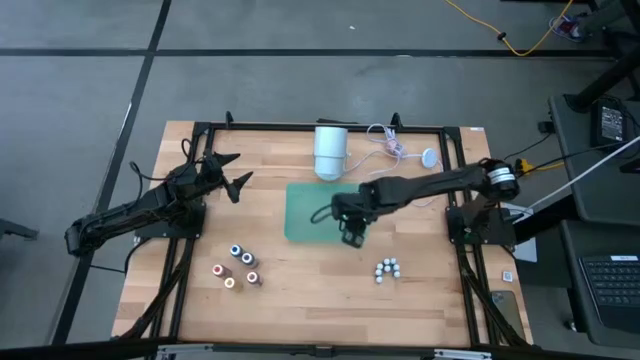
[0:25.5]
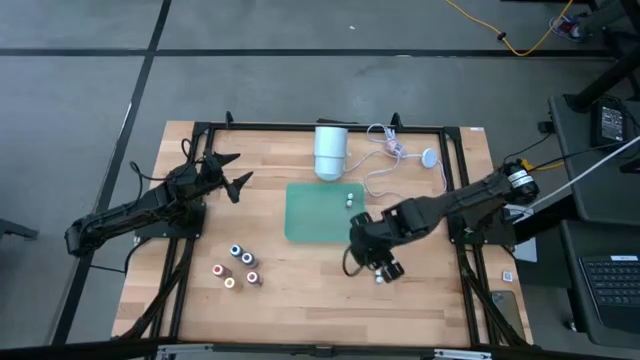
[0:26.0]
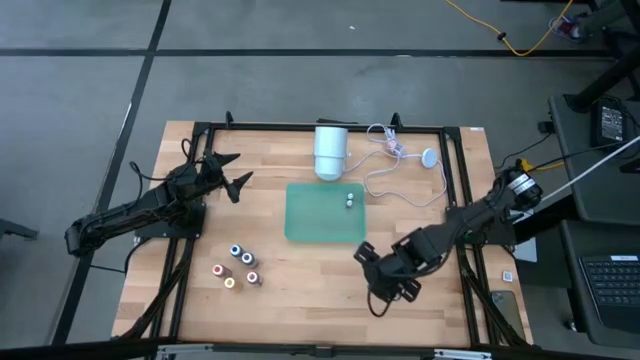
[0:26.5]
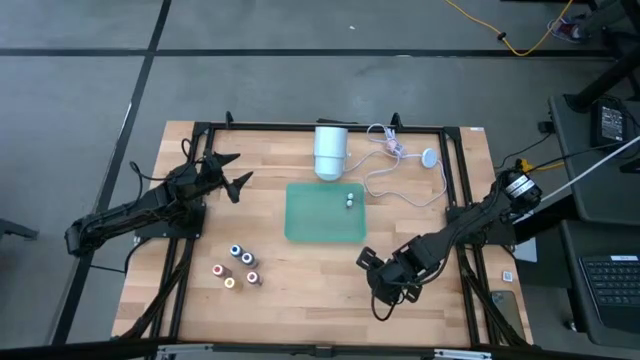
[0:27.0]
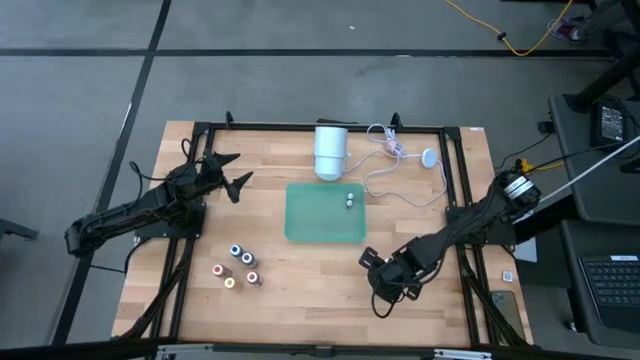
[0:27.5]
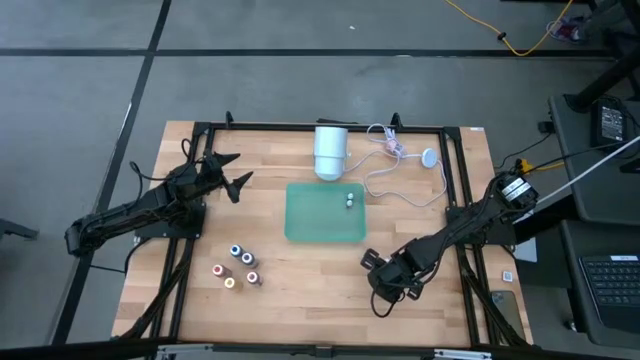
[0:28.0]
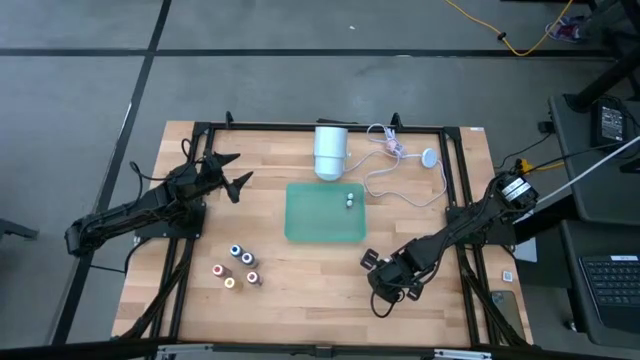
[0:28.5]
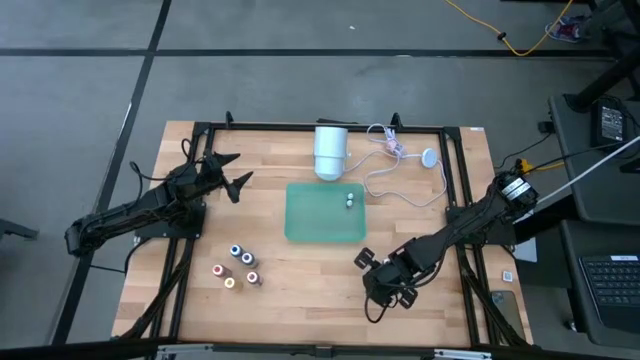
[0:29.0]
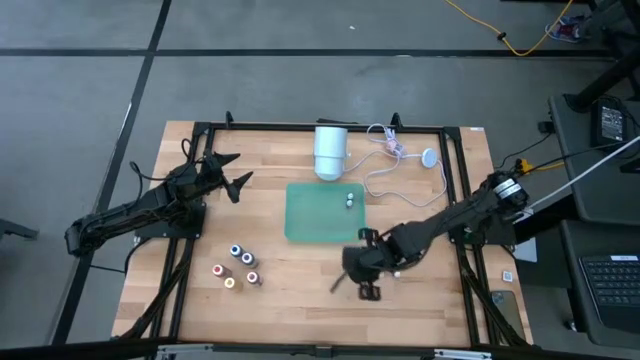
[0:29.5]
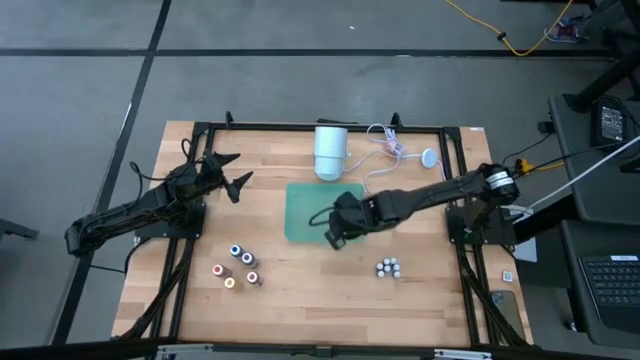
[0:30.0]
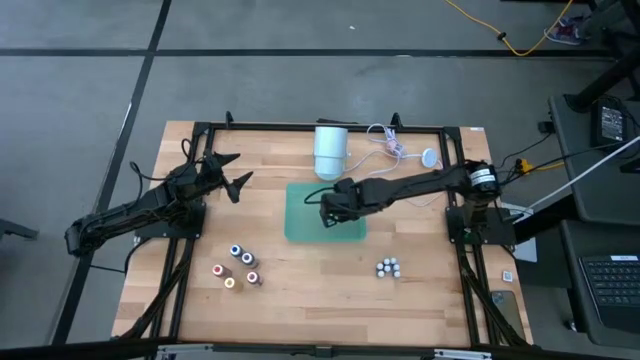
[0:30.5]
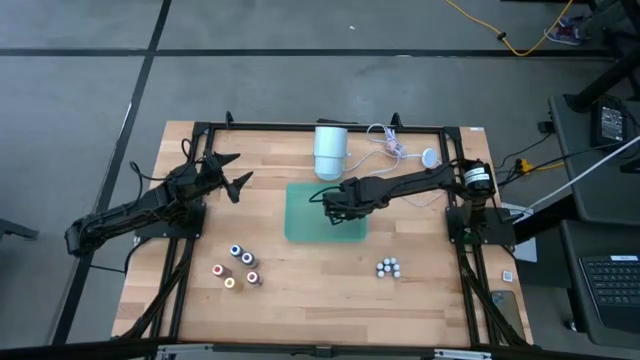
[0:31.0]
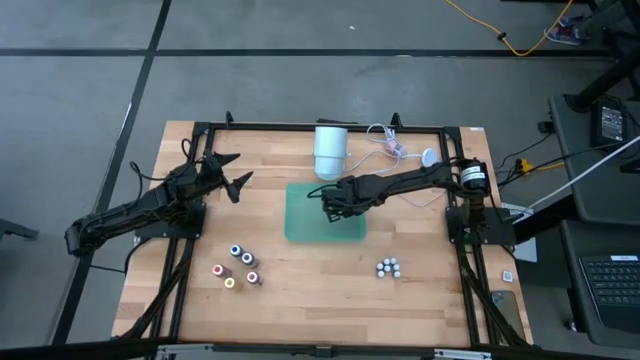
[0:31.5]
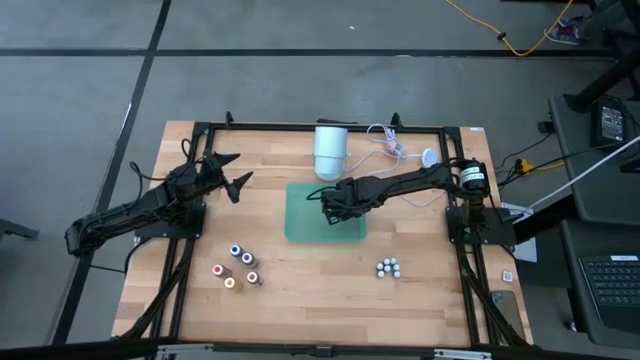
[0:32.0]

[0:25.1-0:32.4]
Task: Pick & Place food coloring
Put the bottom small red food coloring bottle into the green bin

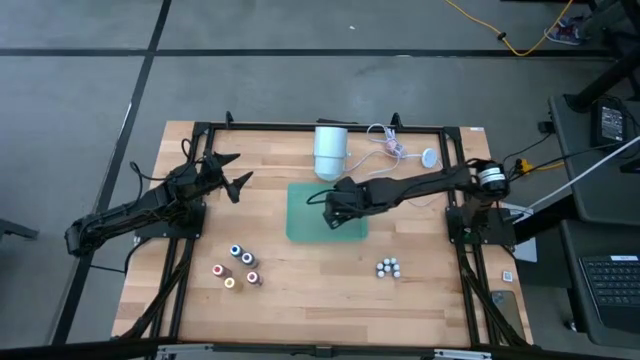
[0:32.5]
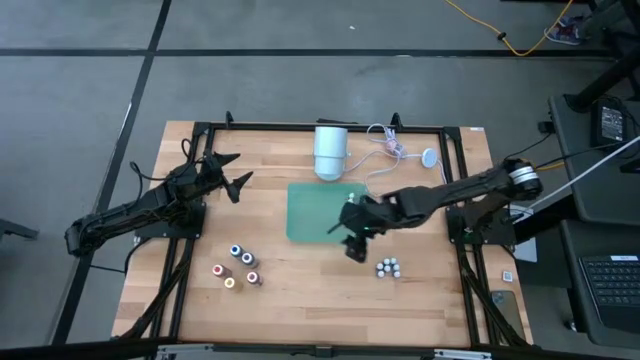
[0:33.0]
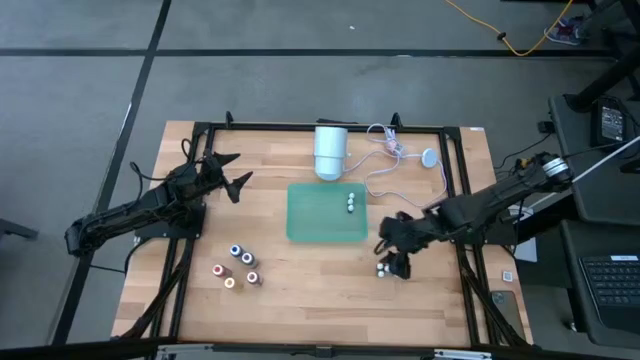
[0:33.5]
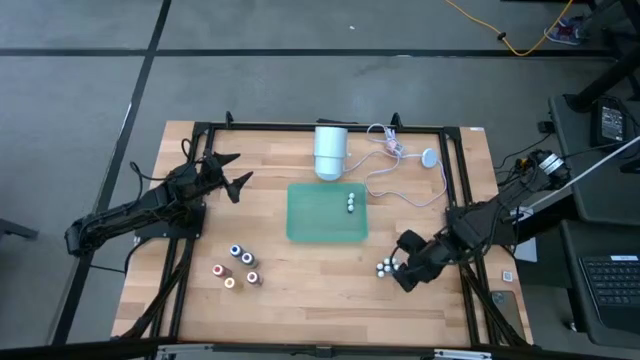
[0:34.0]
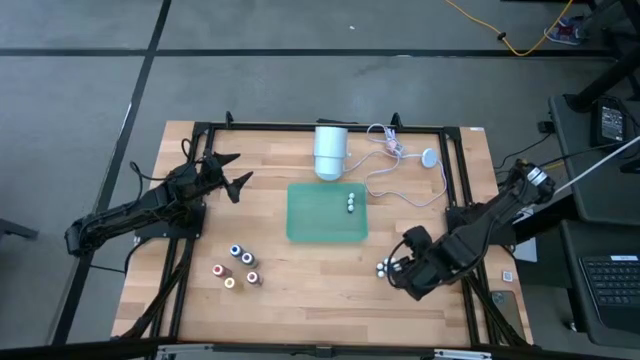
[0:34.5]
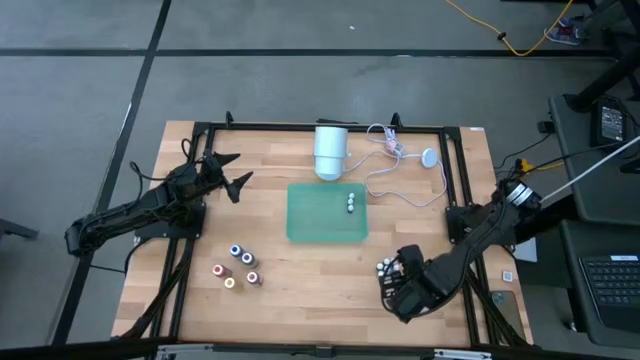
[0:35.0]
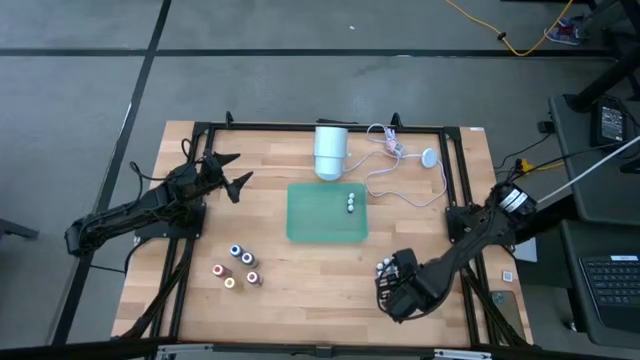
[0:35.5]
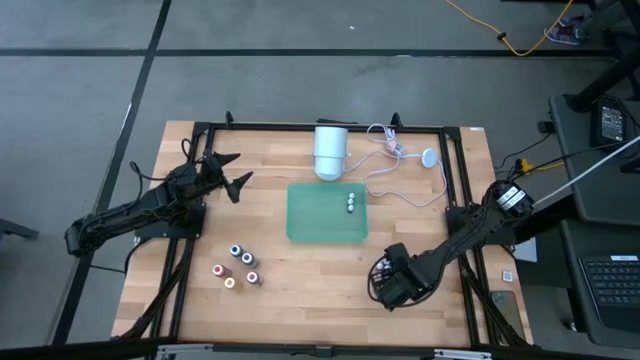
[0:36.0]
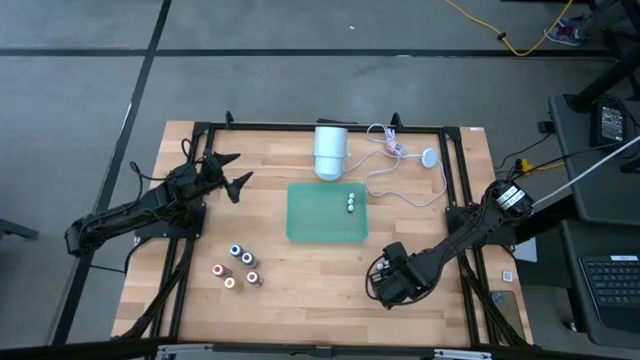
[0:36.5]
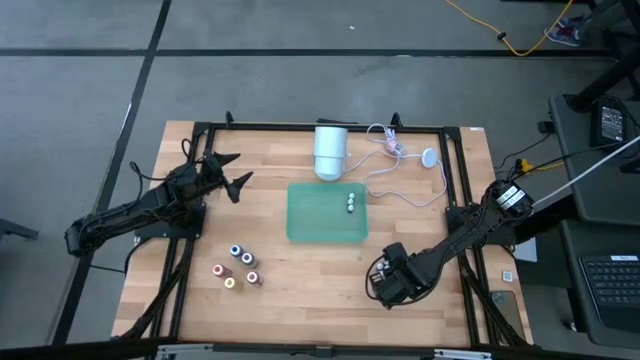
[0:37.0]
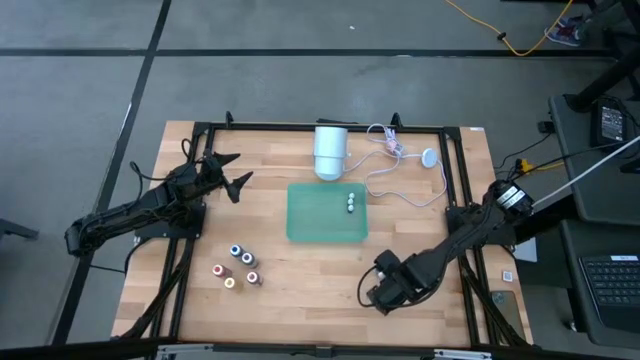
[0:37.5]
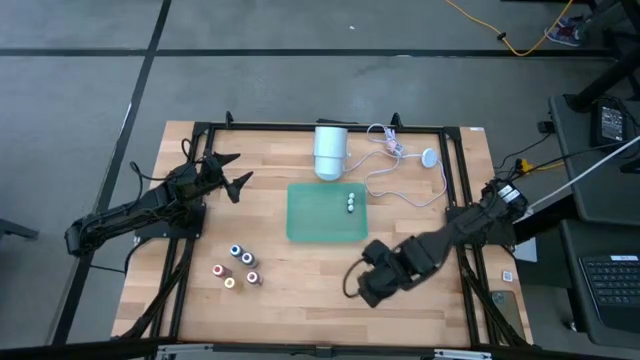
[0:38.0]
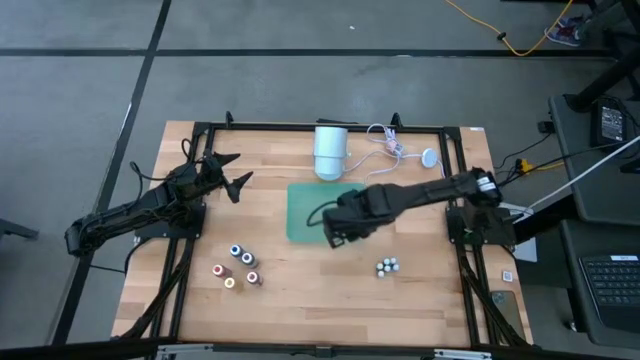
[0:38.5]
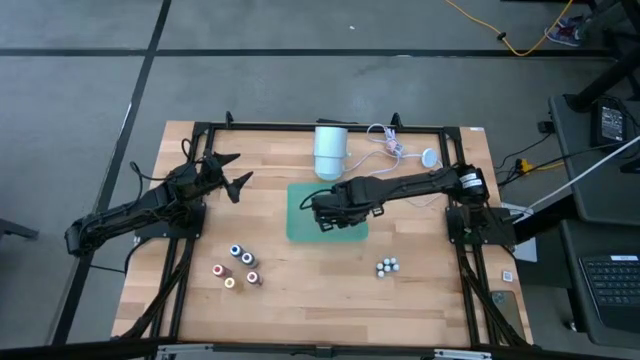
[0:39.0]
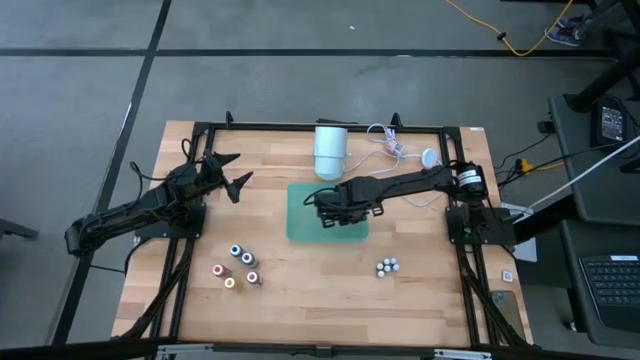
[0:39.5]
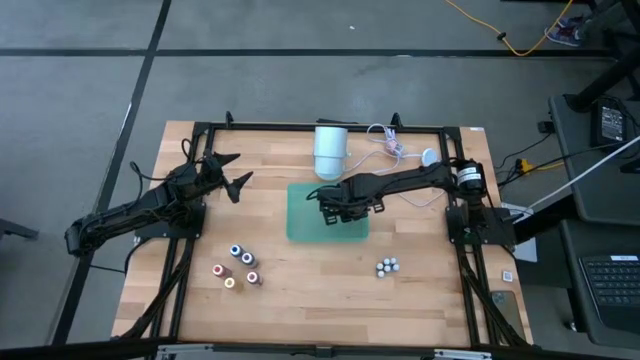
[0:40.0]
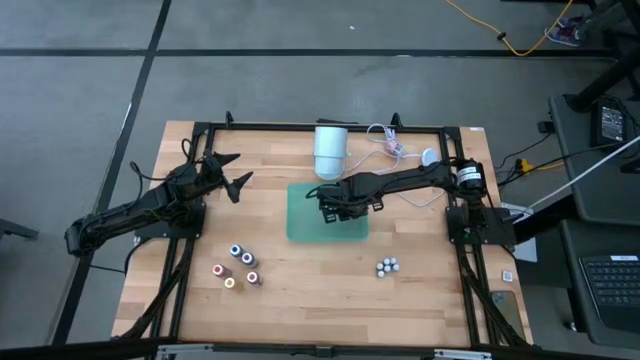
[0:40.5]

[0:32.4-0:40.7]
Put the small purple food coloring bottle into the green bin

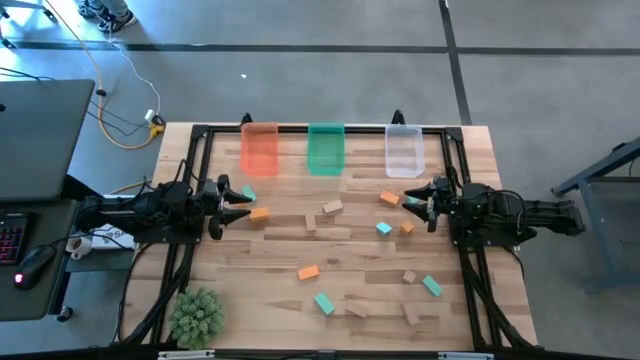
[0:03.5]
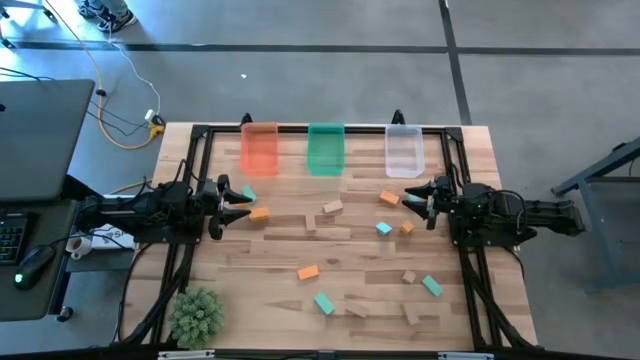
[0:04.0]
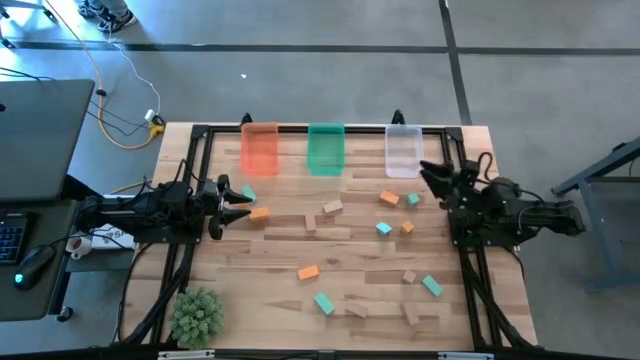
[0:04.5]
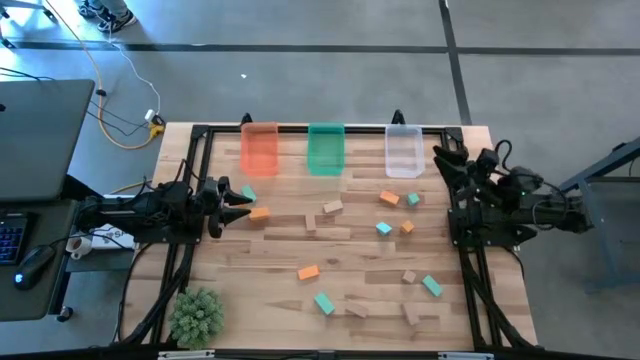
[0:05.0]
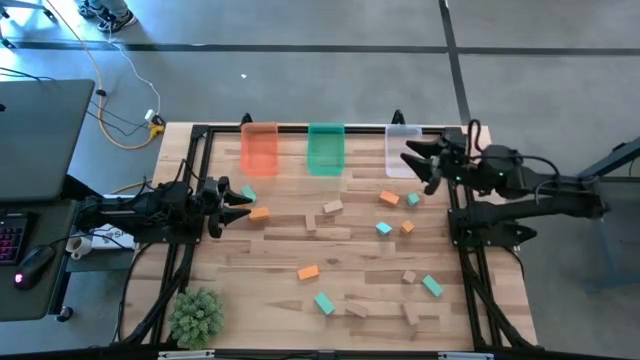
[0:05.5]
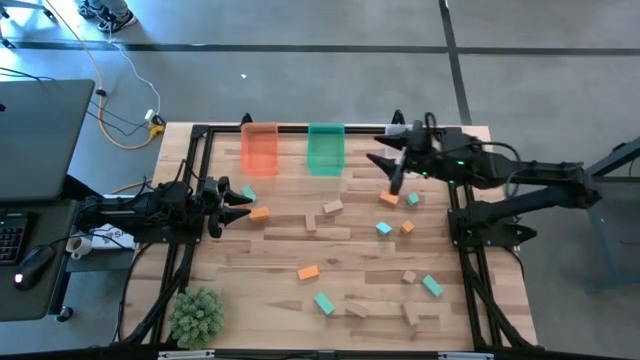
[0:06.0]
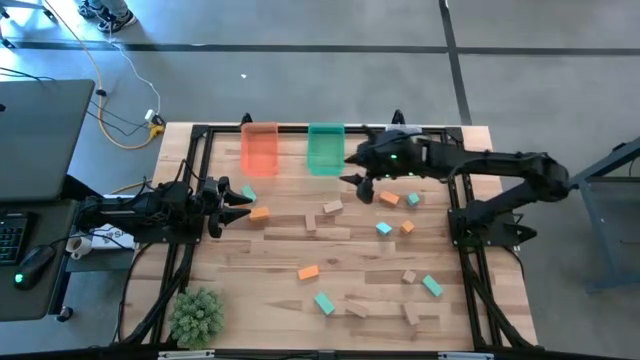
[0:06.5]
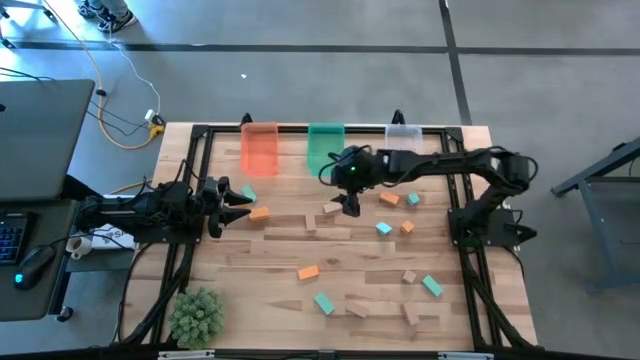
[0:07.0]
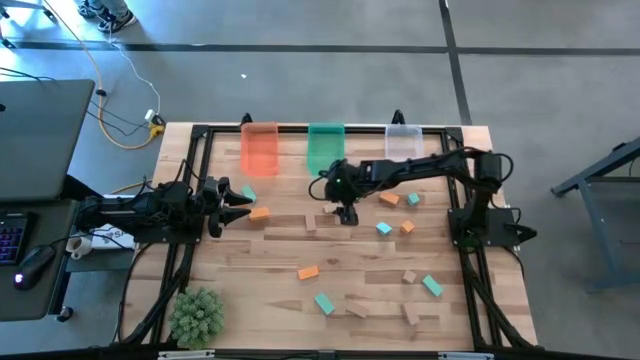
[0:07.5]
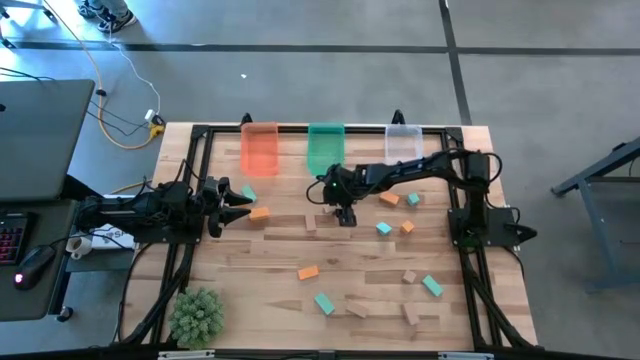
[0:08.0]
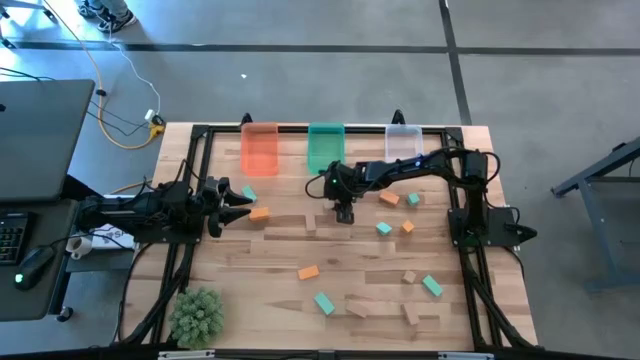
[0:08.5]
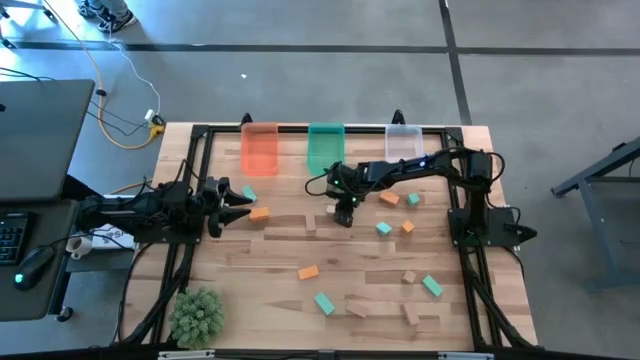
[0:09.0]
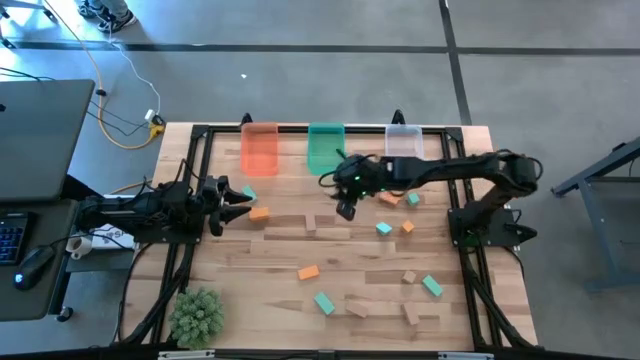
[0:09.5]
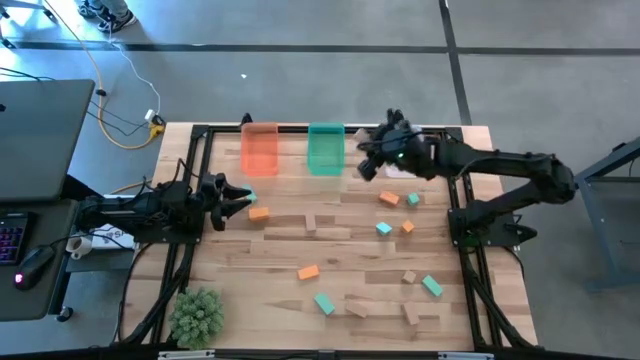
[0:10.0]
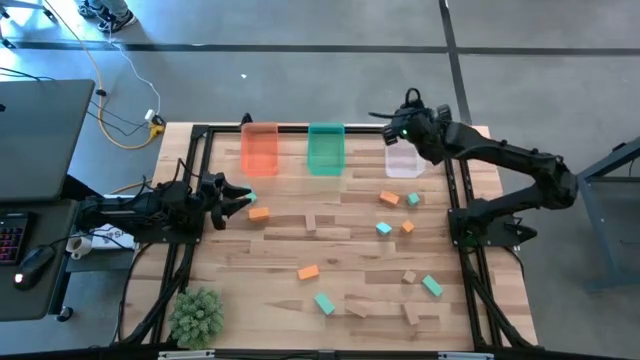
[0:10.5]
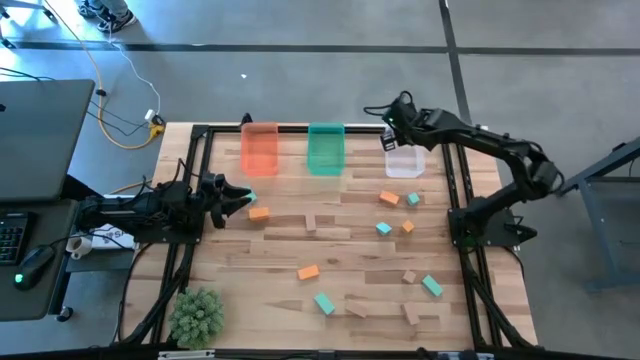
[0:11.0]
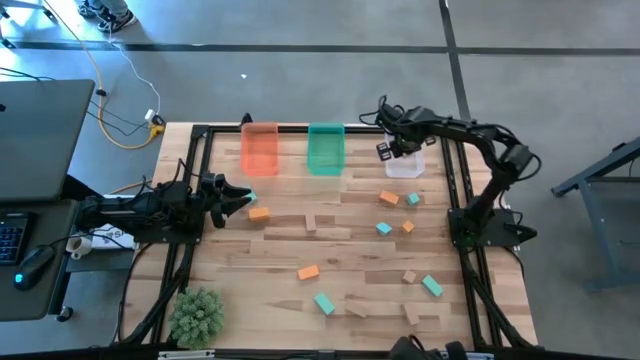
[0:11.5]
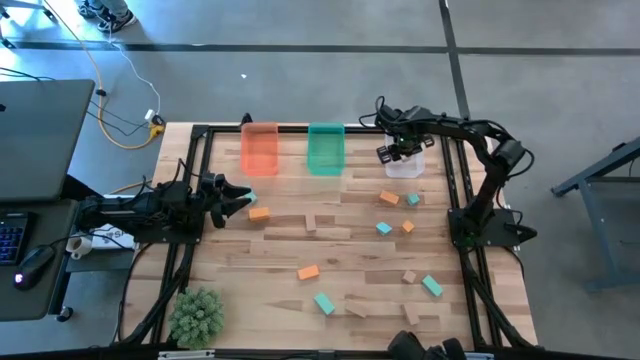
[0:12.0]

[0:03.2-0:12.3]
Task: Sort & place blocks by color
Put the brown block into the white bin
